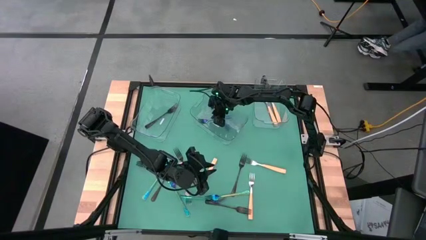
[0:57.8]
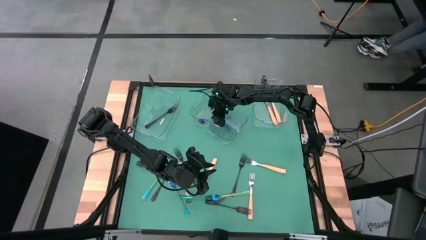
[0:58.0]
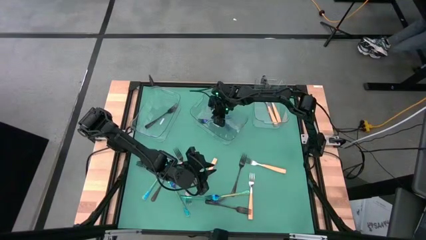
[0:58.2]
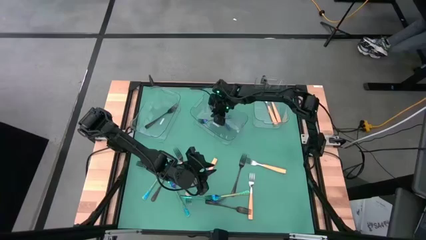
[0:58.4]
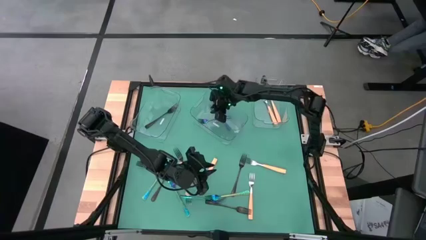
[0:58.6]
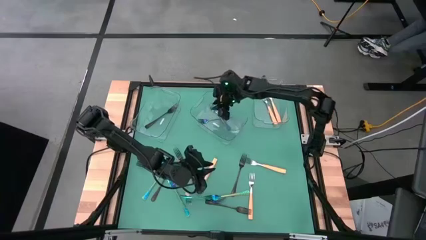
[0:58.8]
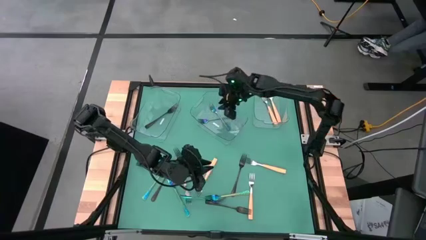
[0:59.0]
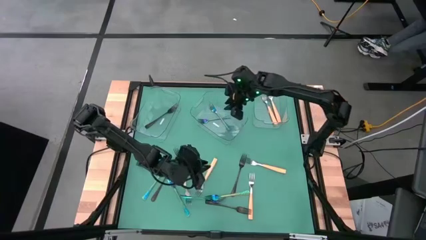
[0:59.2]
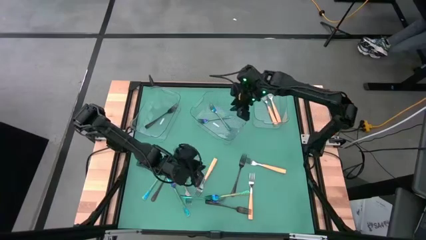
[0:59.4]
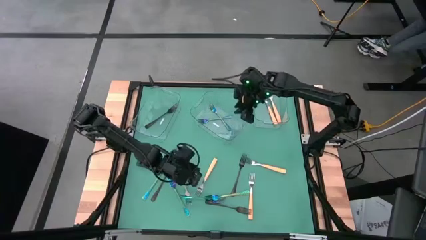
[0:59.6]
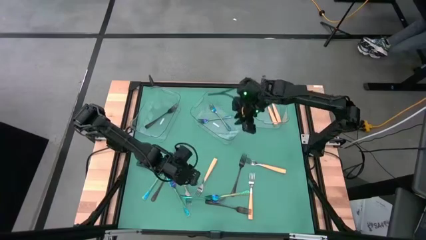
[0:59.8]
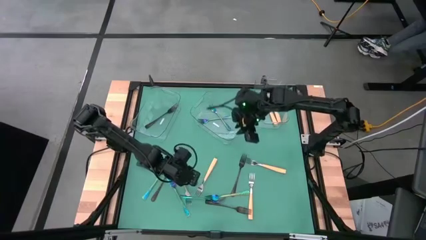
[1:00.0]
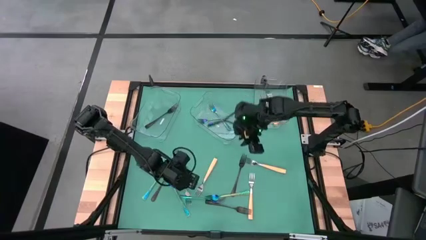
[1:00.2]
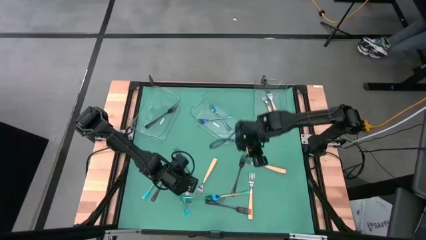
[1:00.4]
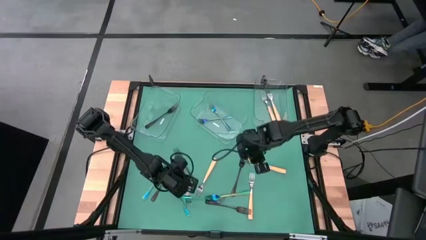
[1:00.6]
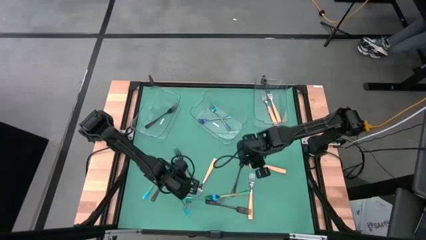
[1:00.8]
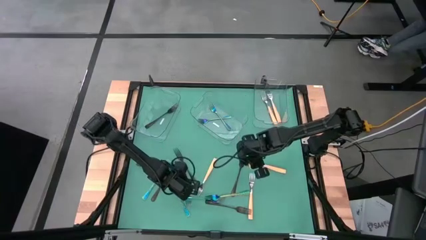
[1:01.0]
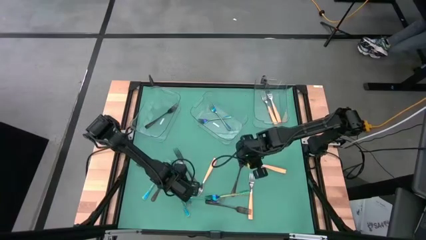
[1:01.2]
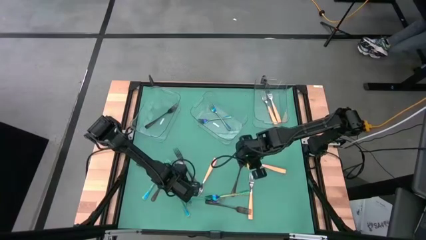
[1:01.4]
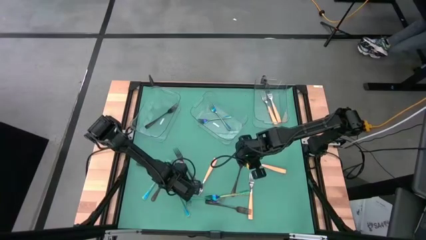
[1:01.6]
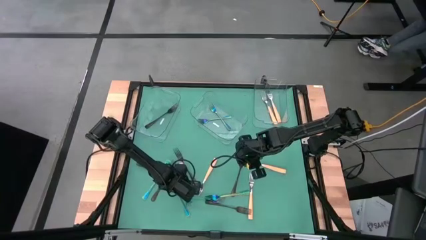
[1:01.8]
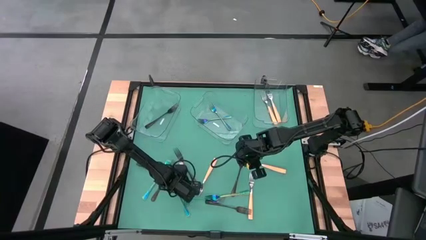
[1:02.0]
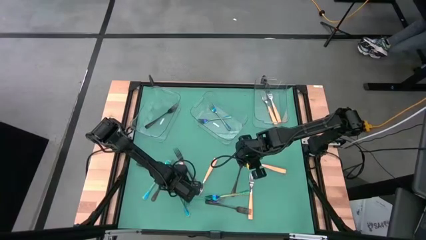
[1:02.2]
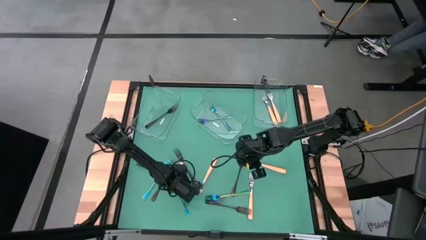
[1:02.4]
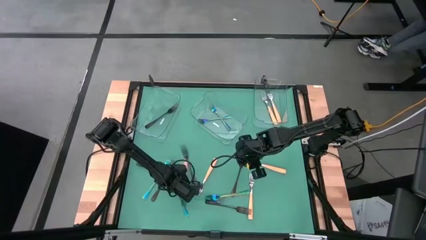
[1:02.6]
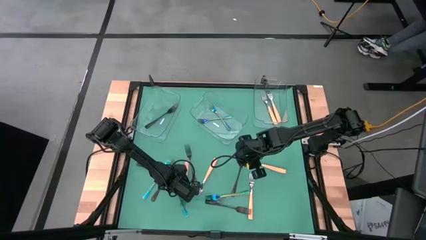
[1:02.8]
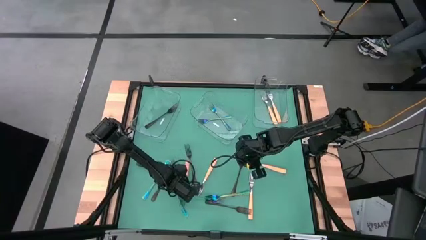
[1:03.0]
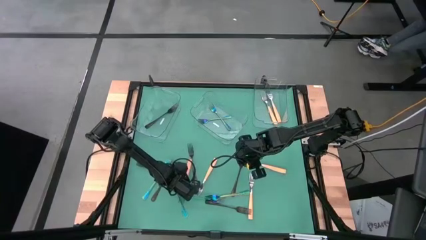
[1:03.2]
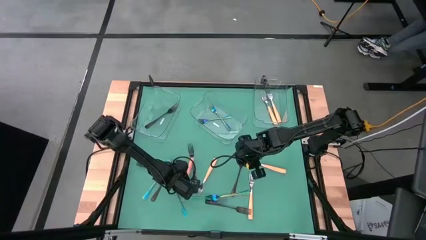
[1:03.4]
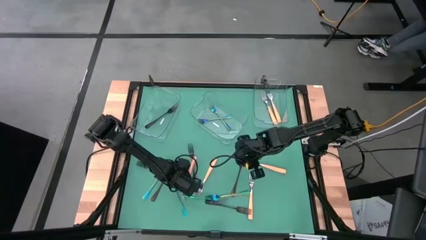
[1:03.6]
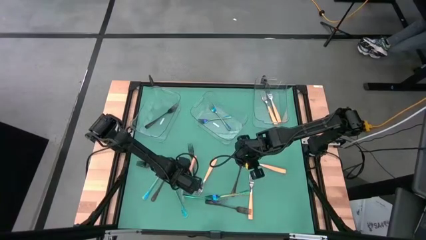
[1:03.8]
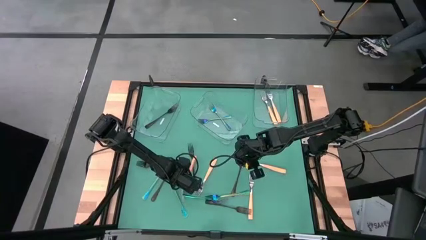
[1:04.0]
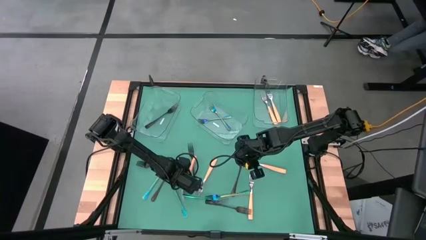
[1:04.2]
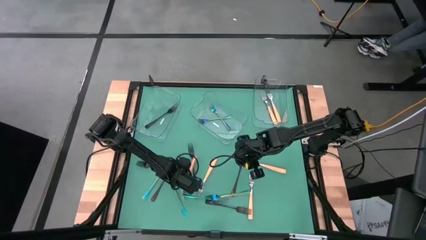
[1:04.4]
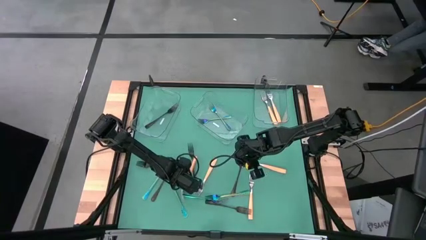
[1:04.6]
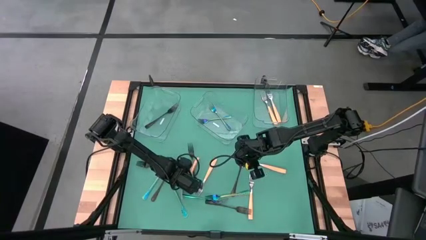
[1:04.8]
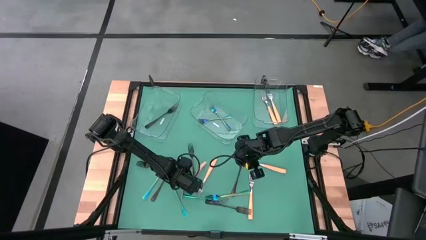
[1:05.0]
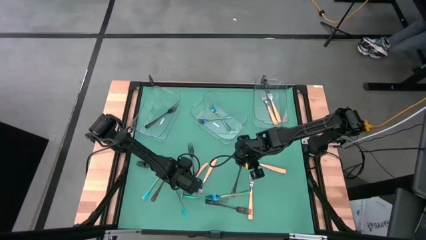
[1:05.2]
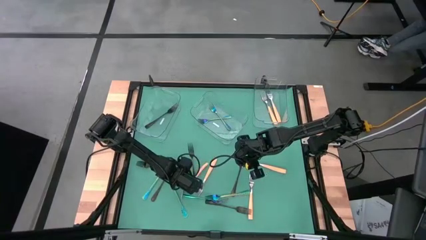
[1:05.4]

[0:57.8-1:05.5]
Task: Sort silverware by color (type)
Put the orange fork into the right transparent bin

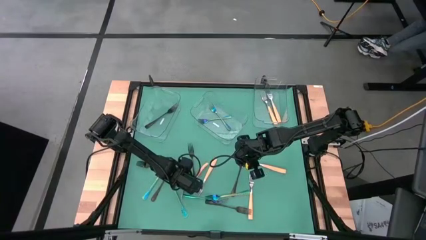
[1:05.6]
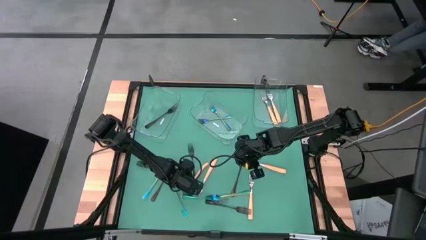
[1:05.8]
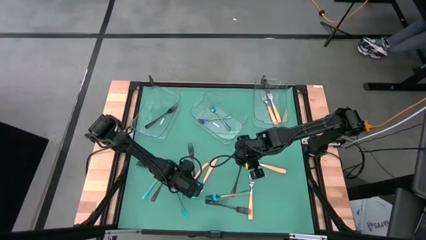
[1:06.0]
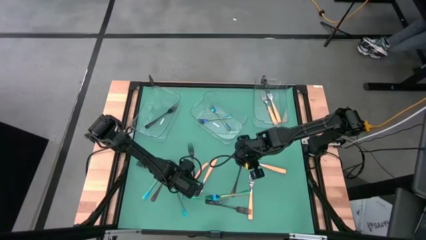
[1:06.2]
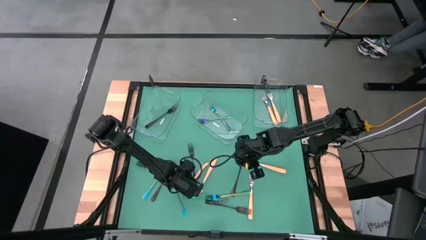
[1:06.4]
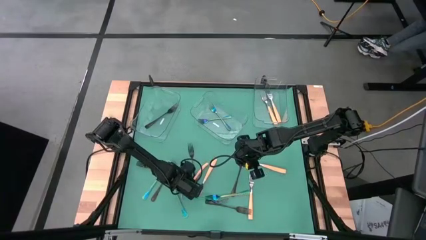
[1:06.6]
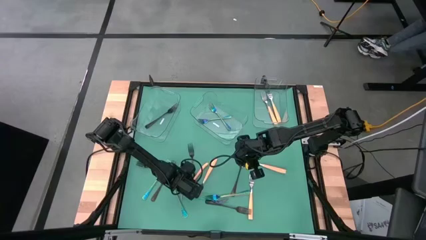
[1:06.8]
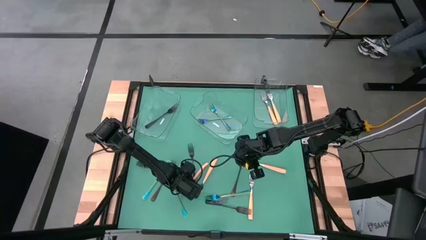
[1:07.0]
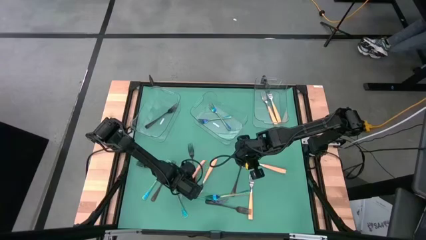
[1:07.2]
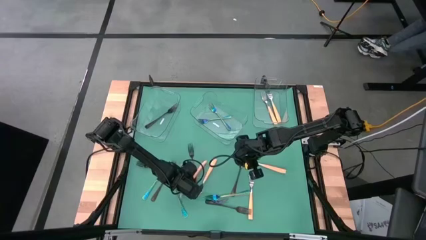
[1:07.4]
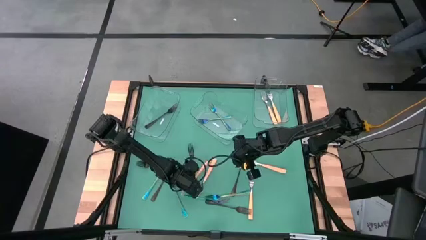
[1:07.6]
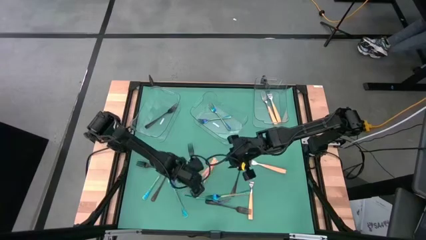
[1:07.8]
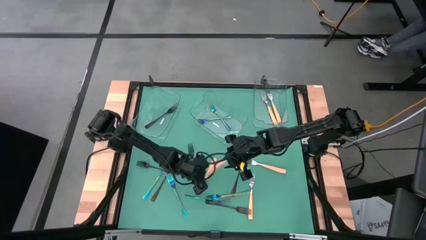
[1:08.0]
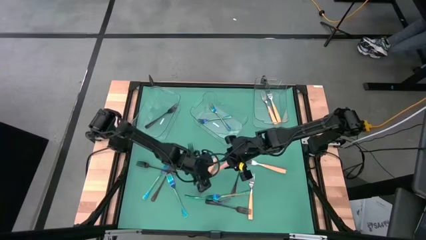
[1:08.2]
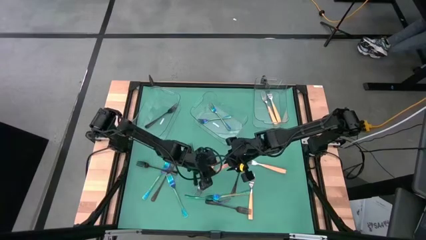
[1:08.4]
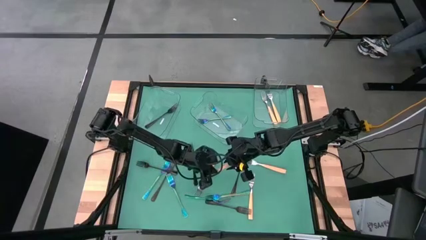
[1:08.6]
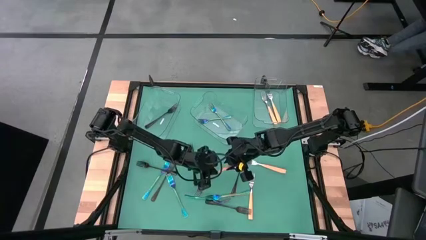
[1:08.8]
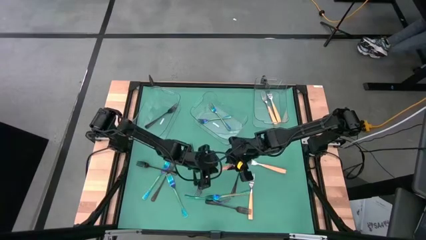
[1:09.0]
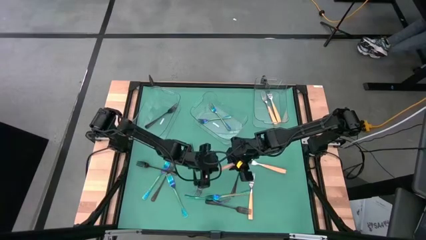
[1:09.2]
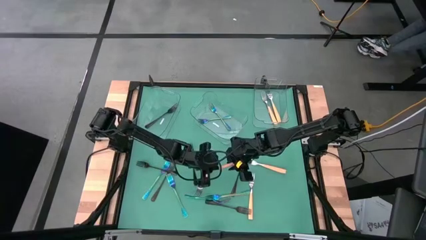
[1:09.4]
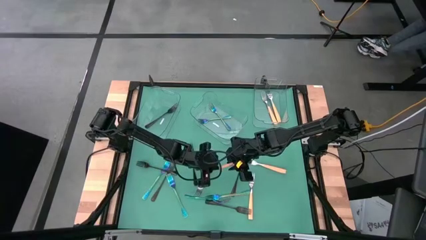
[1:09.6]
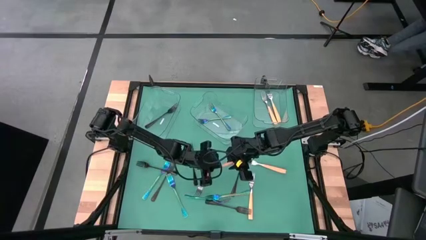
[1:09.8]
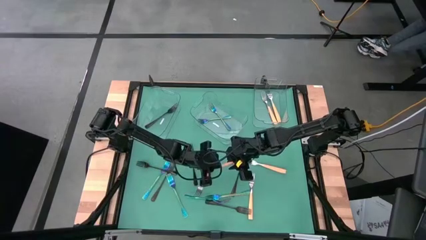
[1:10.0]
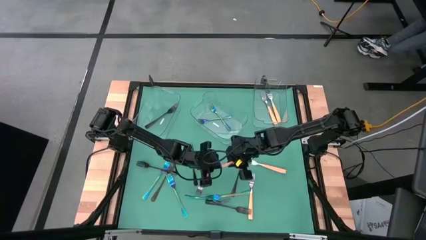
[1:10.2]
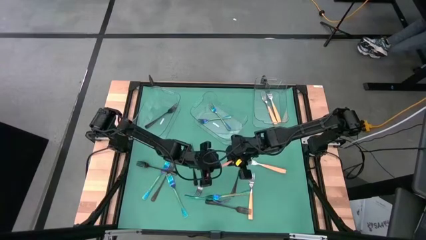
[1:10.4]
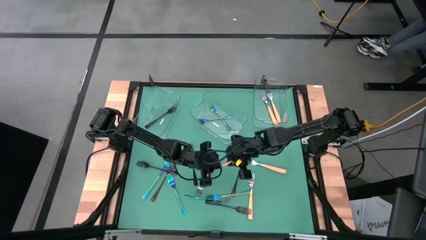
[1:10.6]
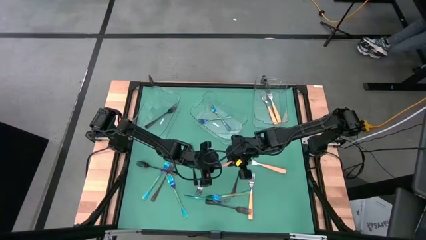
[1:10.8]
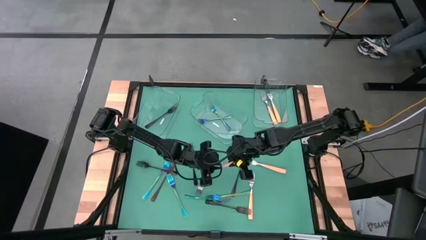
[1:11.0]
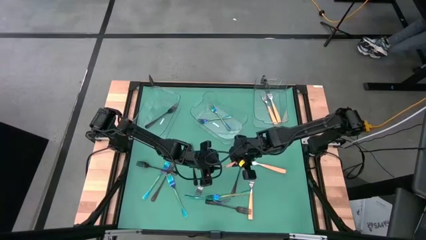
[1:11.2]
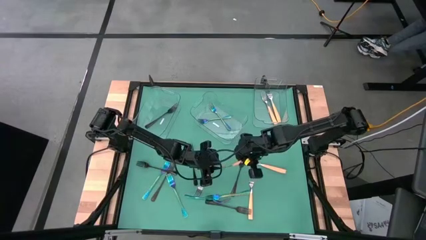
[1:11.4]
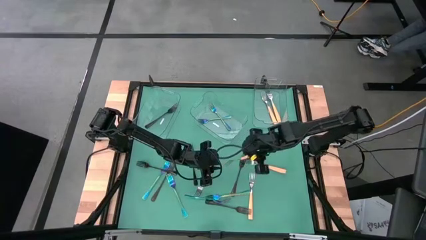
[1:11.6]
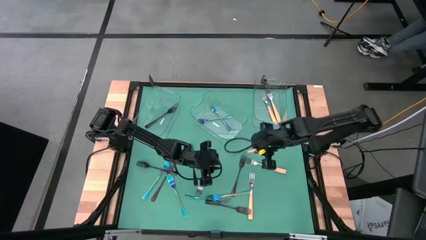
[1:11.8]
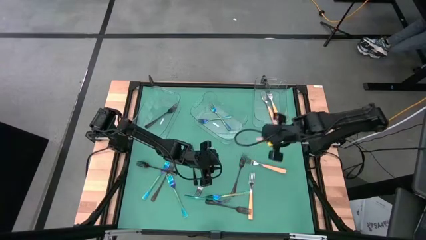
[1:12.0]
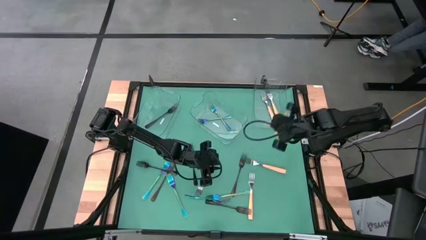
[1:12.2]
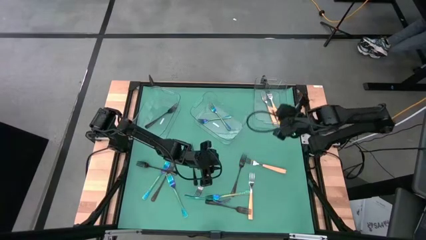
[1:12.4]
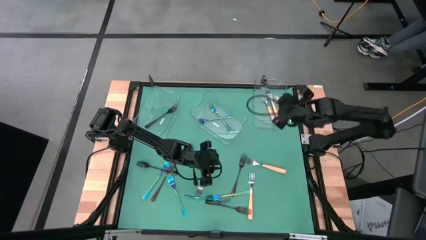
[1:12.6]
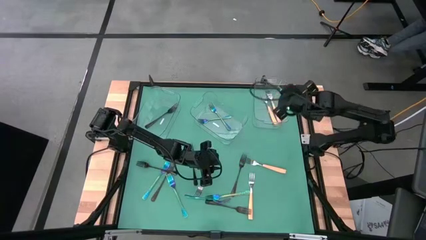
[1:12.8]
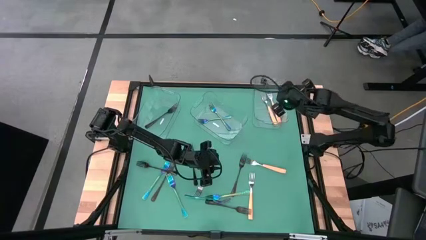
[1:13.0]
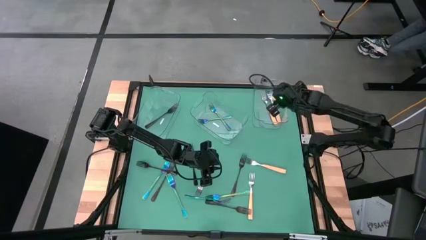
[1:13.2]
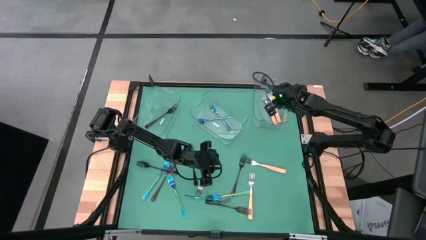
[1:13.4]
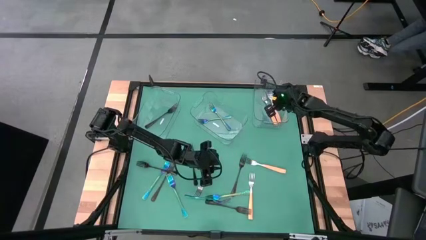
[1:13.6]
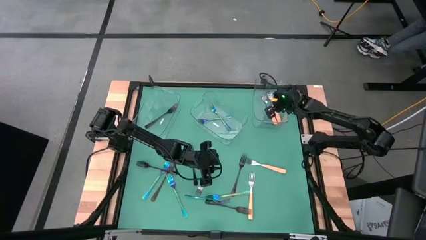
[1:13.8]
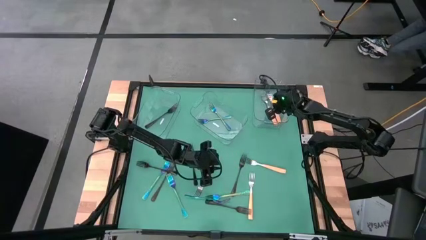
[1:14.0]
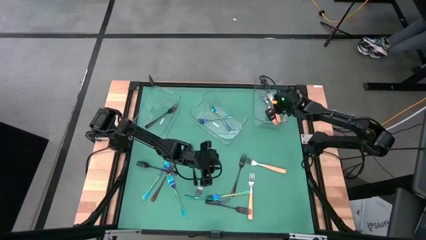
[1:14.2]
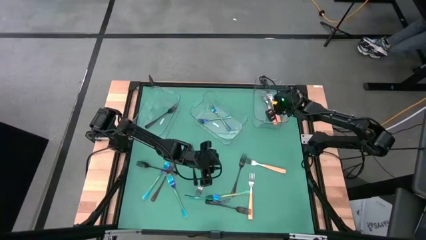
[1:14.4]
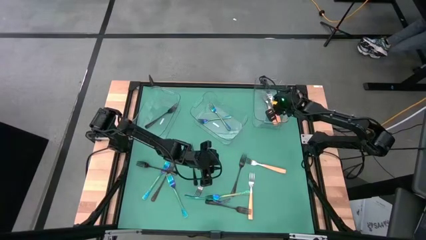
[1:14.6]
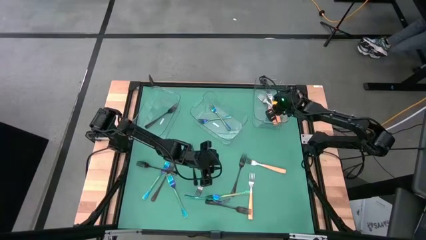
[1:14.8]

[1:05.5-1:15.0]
Put the orange fork into the right transparent bin
